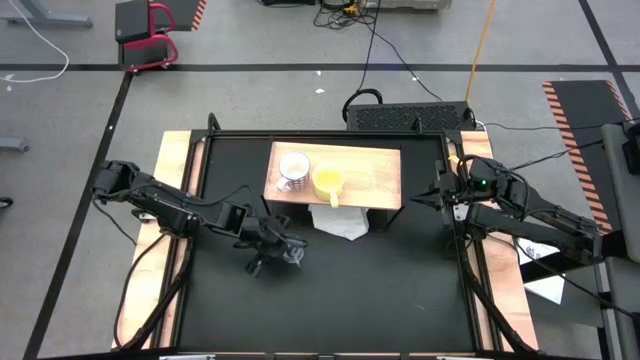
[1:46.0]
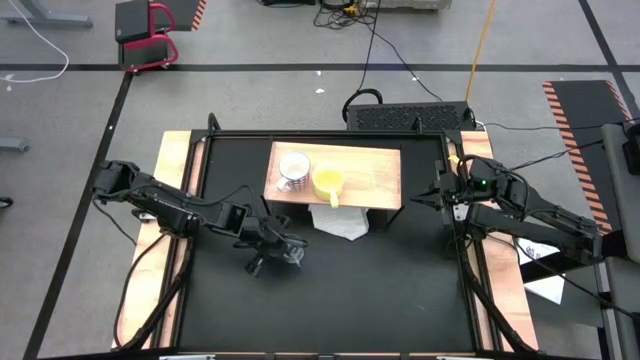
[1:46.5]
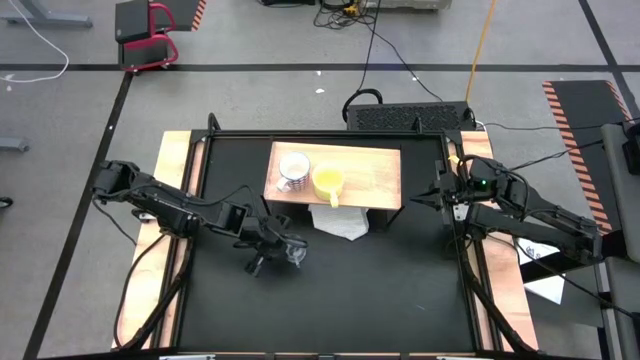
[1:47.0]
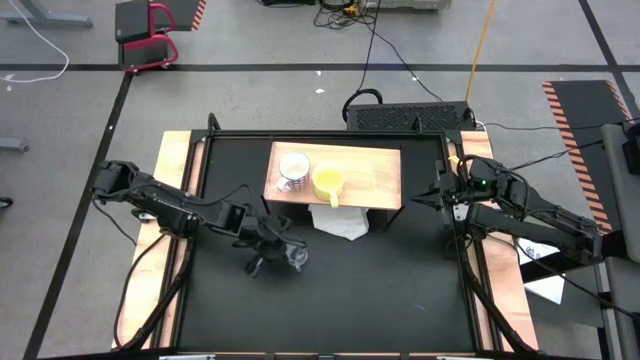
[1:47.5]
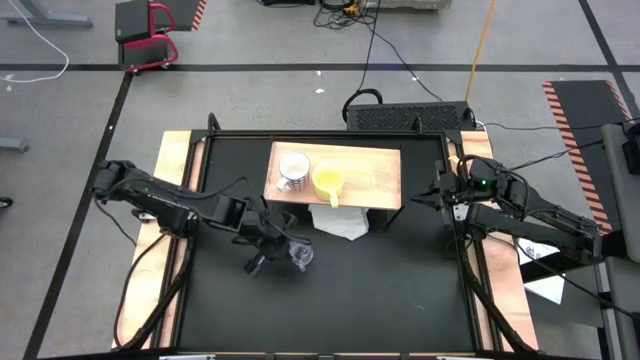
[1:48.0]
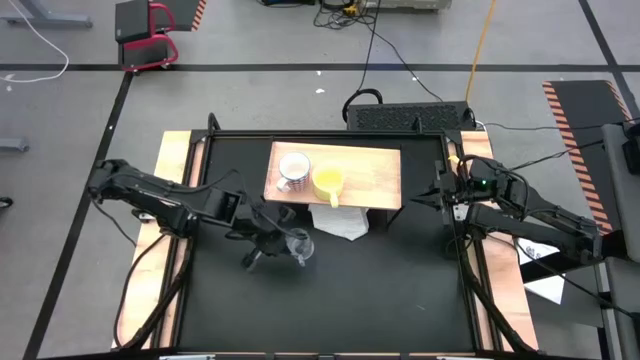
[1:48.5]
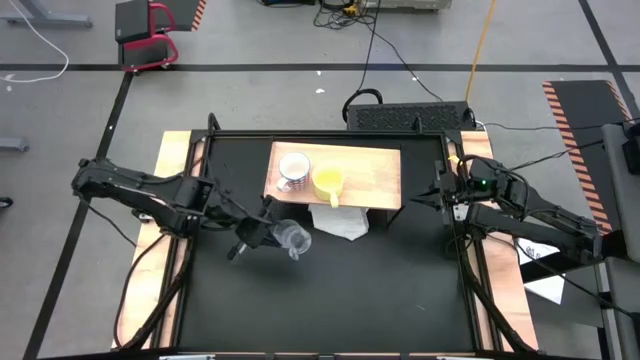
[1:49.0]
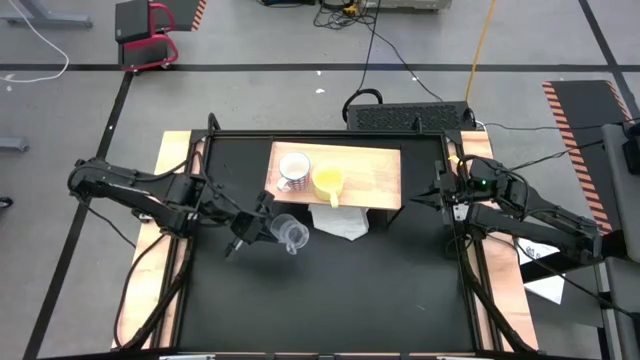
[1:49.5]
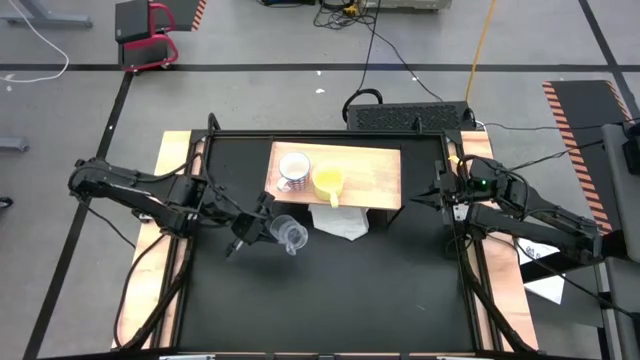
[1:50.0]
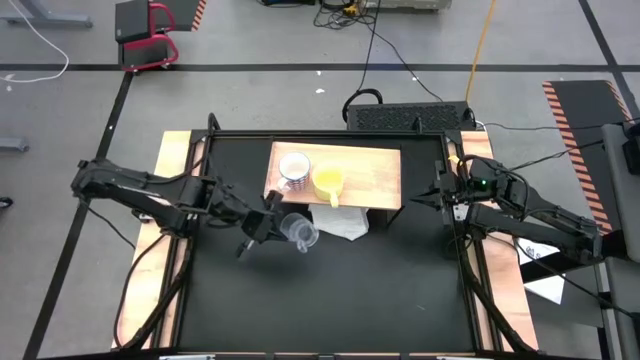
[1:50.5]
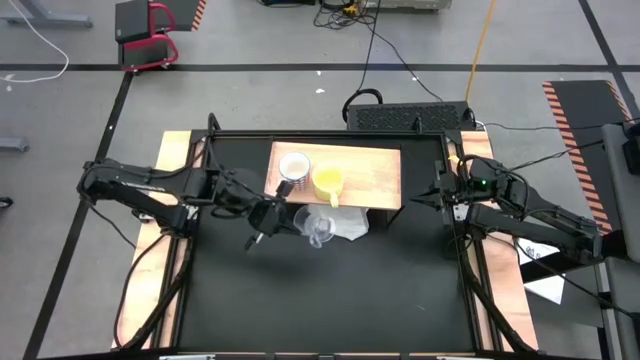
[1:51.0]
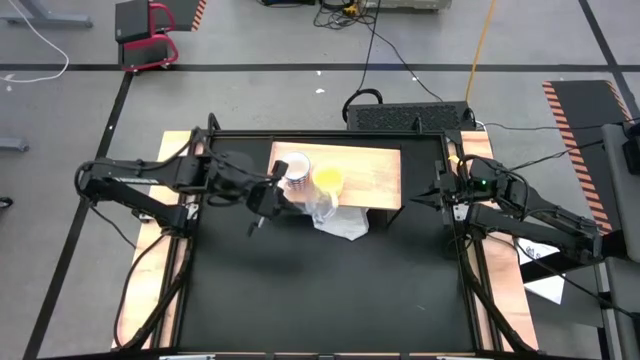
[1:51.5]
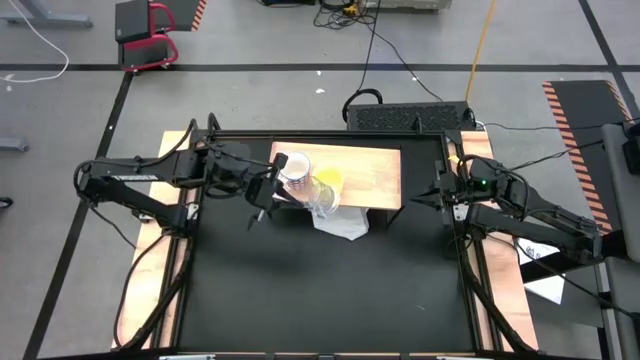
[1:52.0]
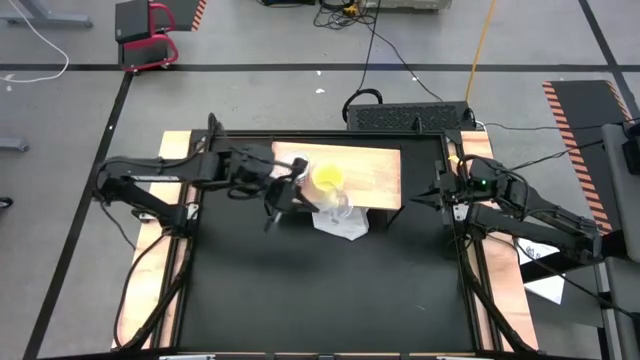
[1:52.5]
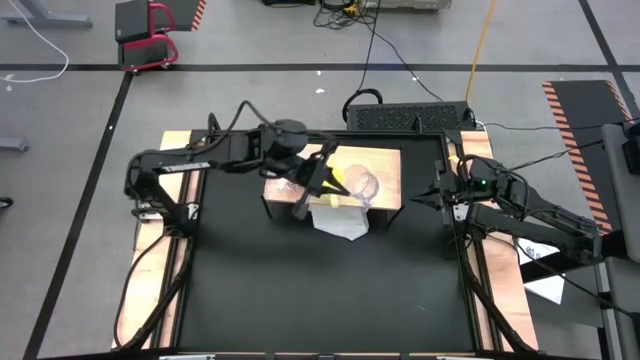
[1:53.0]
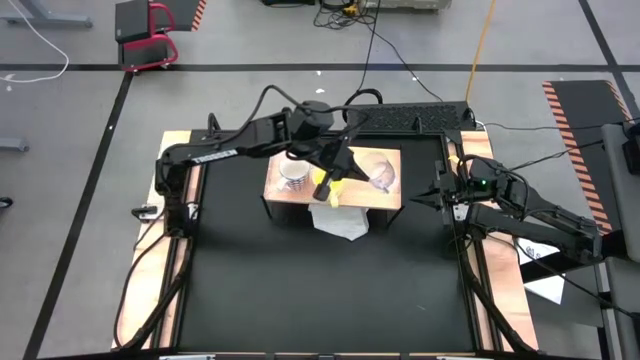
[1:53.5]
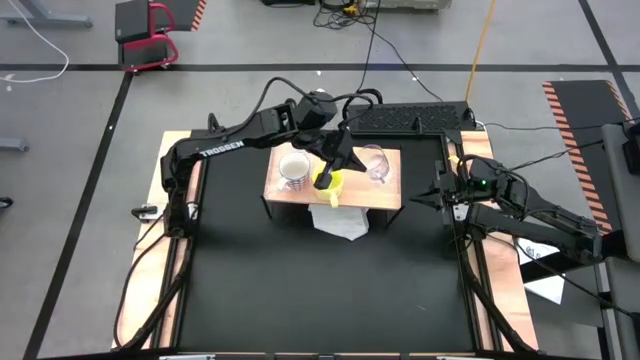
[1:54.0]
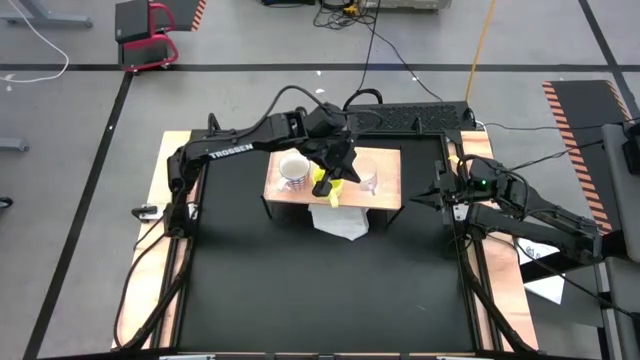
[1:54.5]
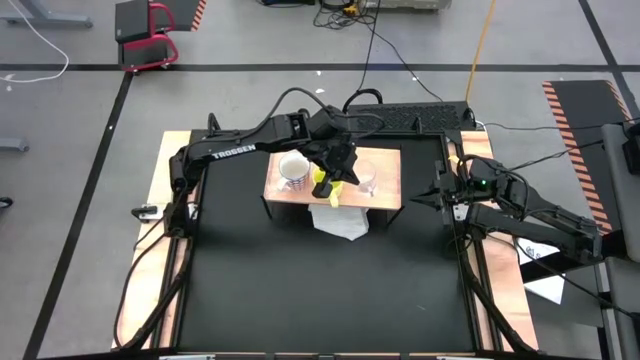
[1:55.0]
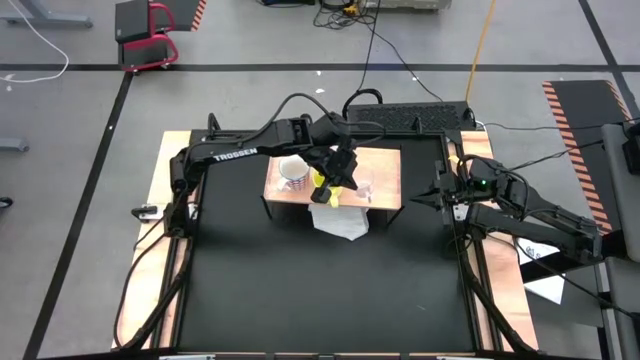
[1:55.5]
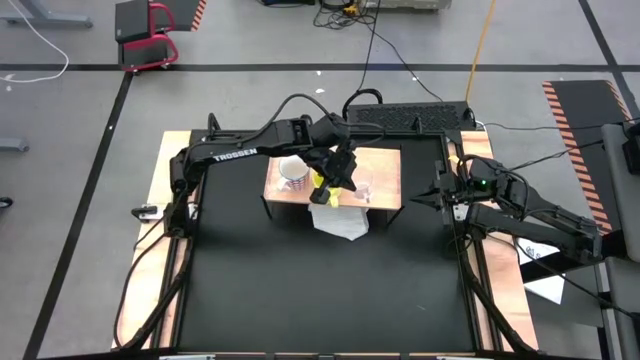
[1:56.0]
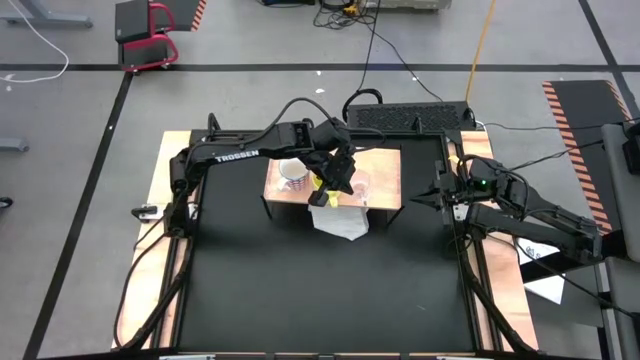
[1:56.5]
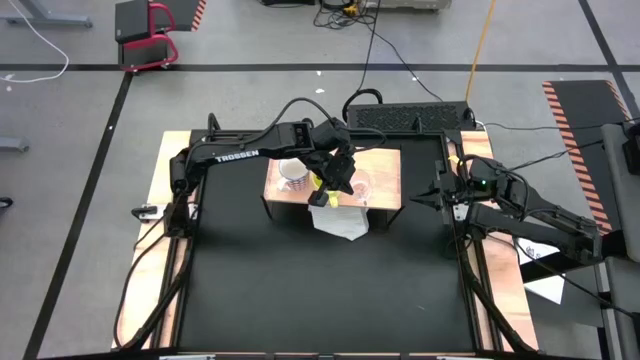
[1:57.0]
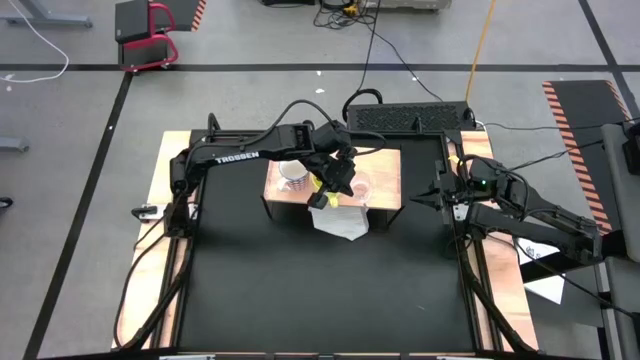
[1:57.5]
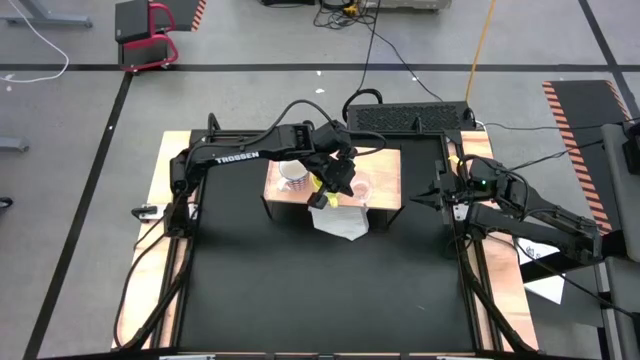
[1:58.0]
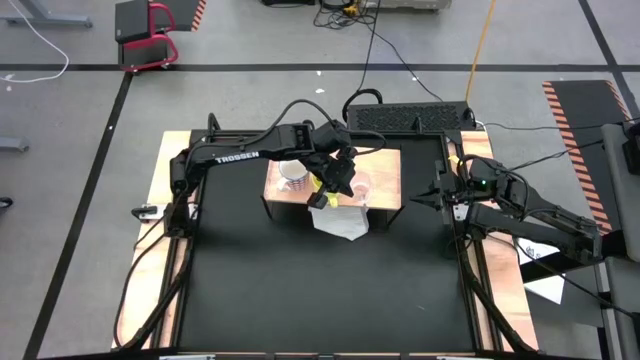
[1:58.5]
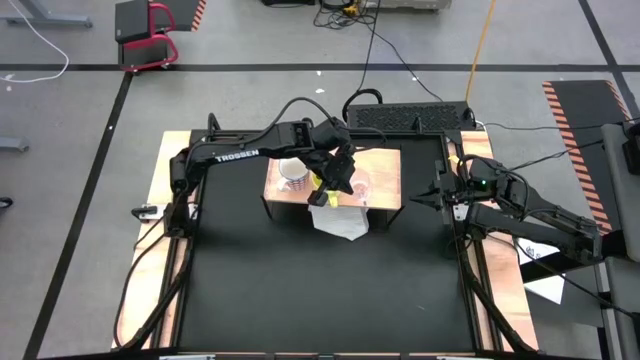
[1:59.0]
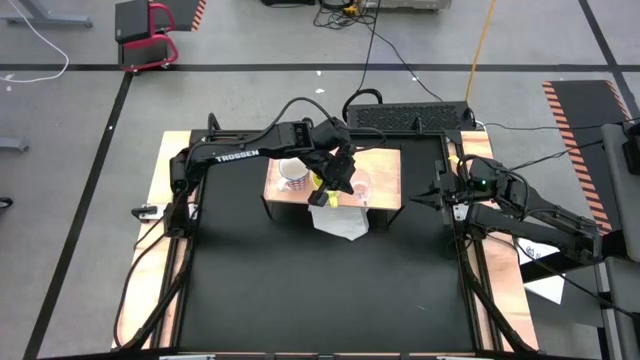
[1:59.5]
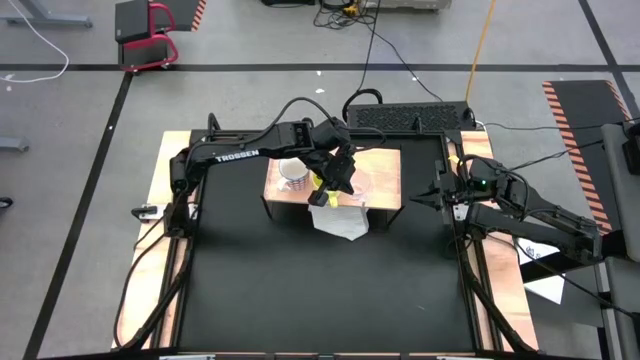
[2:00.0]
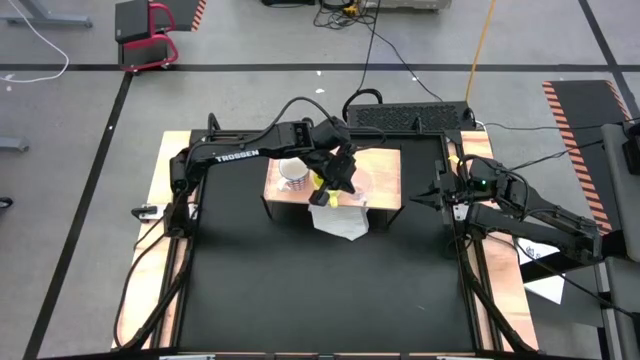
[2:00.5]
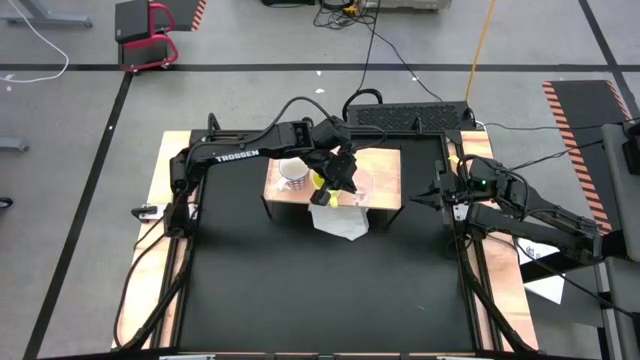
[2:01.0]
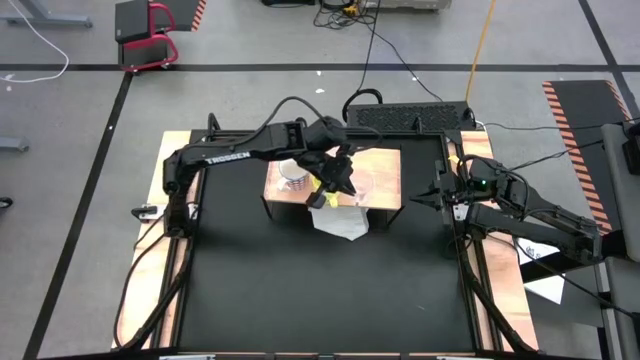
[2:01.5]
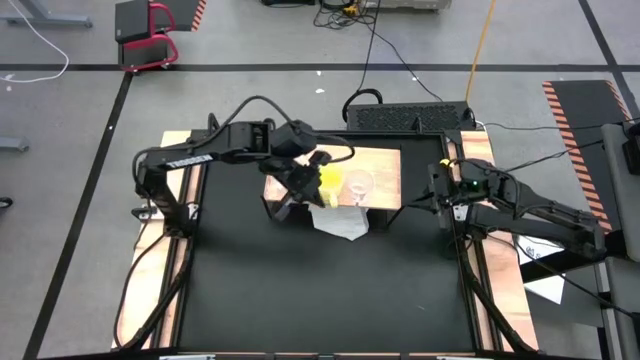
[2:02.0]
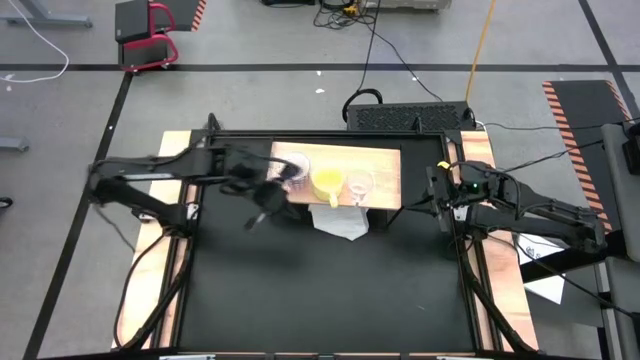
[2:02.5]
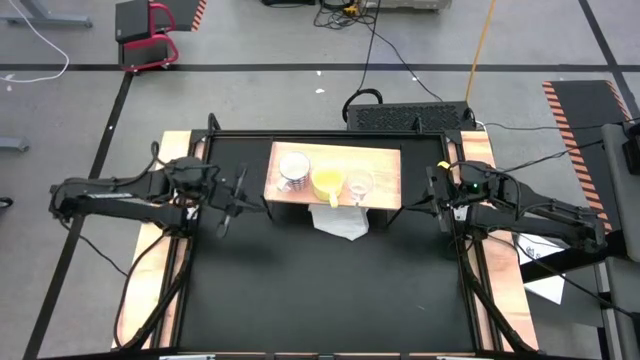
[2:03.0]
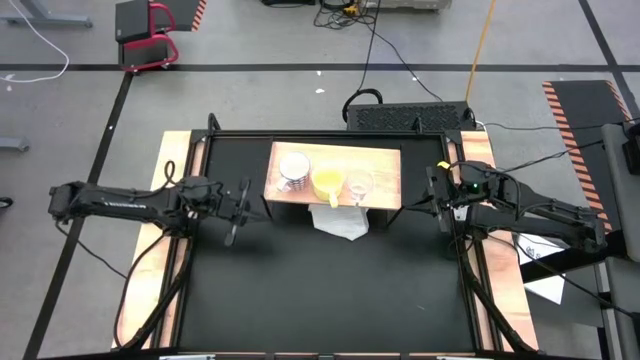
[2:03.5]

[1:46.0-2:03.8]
Task: Stack small to large cups/mugs on shelf
Put the transparent mug on the shelf

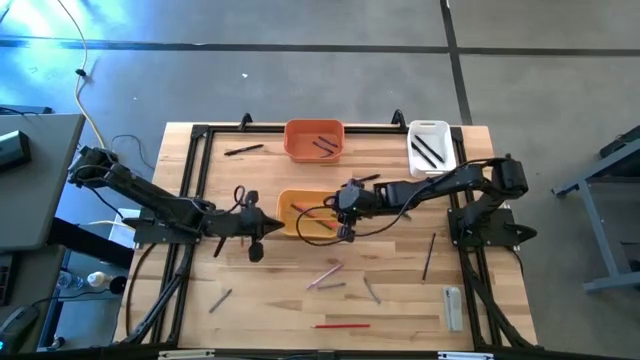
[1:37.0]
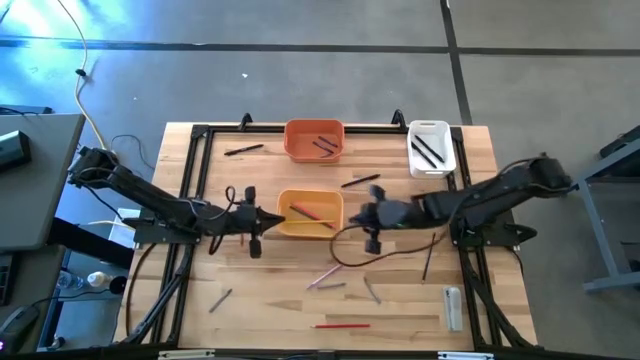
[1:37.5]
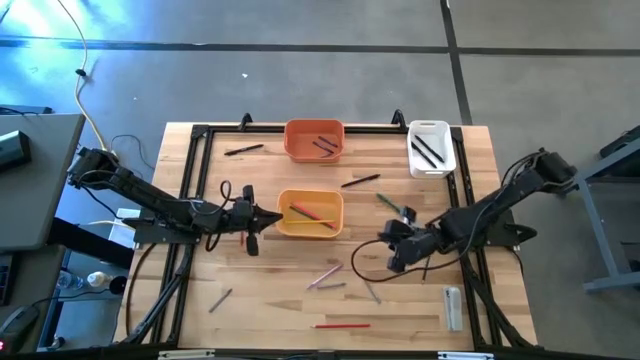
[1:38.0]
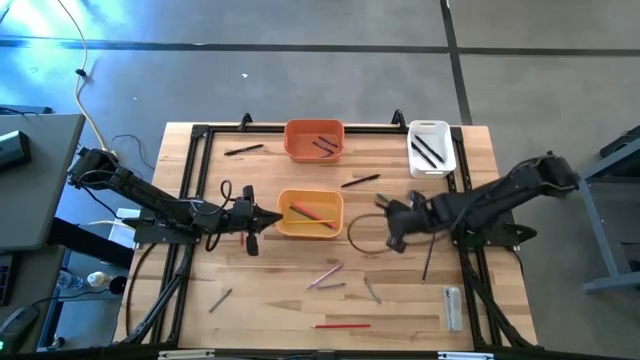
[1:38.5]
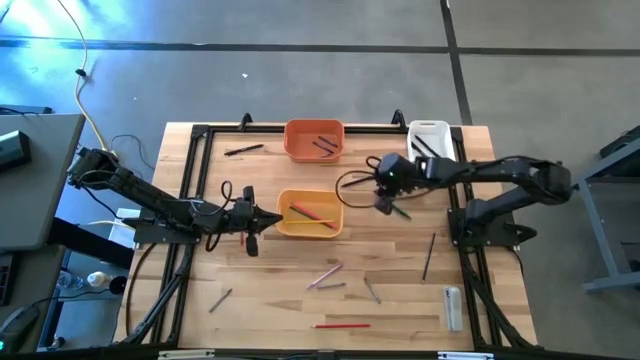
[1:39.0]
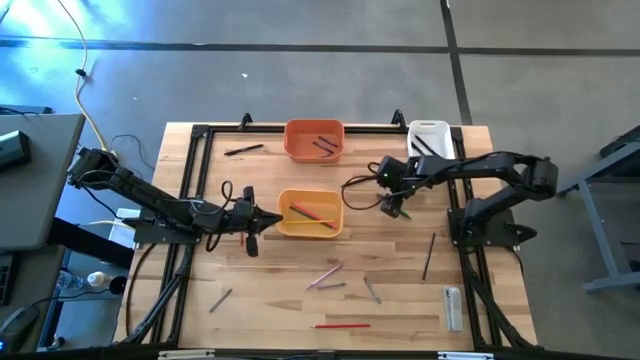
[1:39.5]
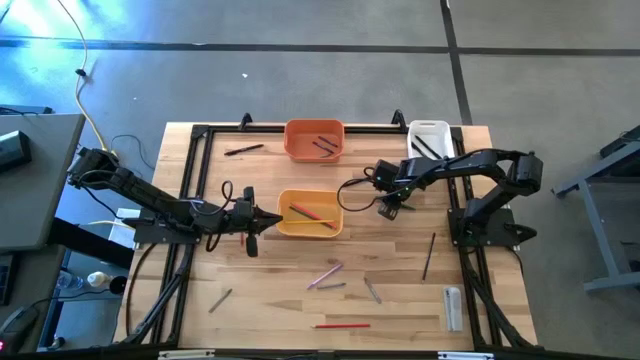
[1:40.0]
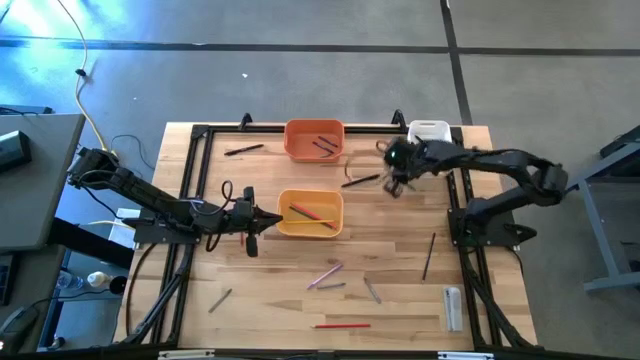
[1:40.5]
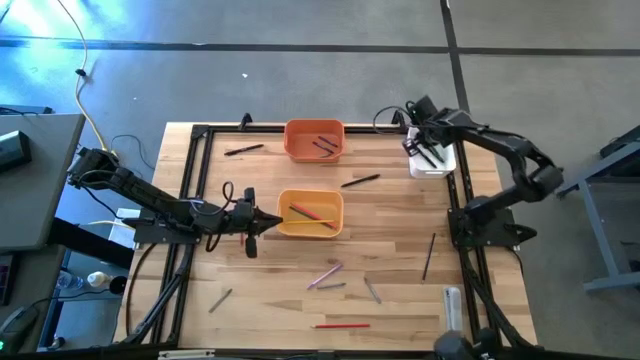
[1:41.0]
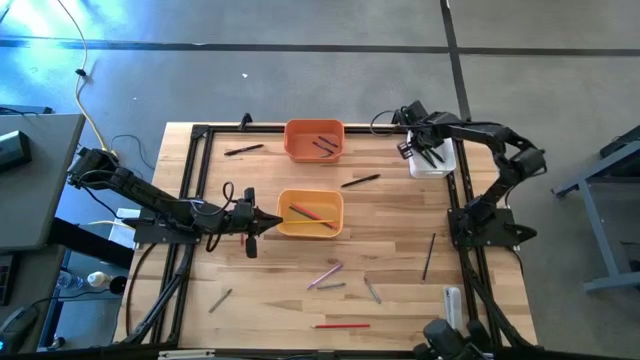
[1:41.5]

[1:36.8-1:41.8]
Task: Sort crayons/erasers/pens/pencils in bins
Put the green pen into the white bin
